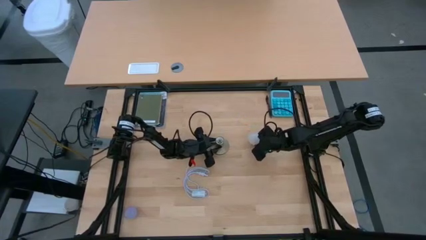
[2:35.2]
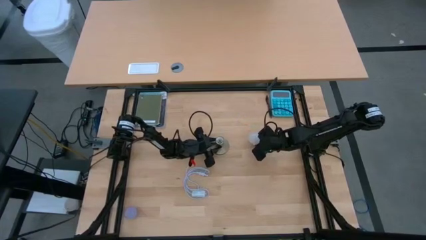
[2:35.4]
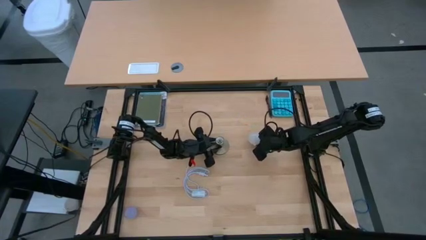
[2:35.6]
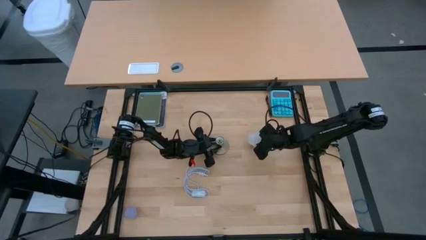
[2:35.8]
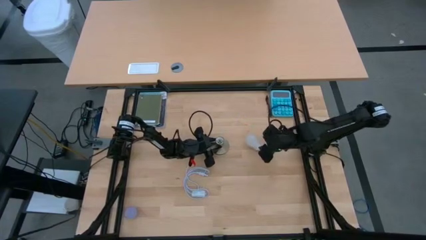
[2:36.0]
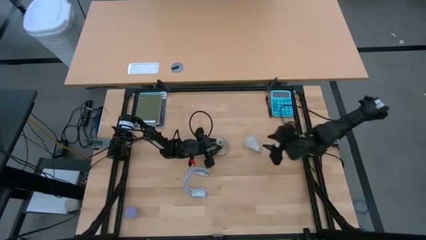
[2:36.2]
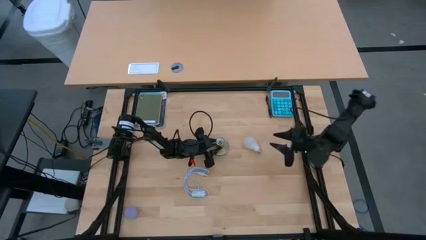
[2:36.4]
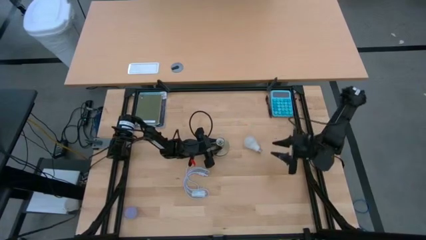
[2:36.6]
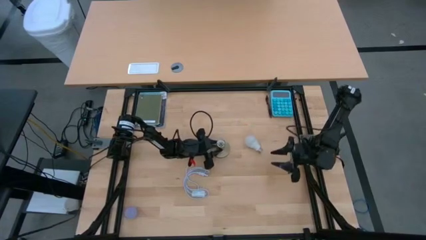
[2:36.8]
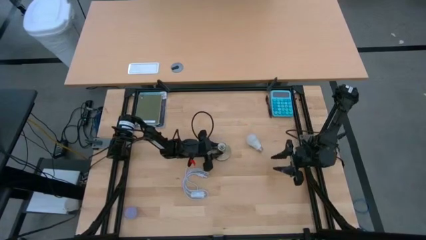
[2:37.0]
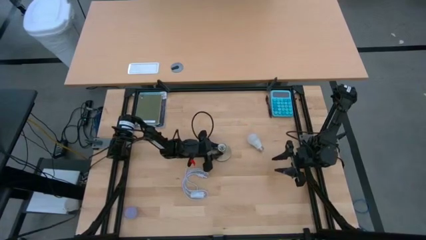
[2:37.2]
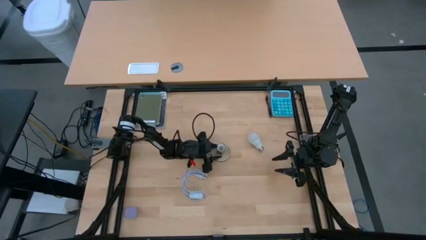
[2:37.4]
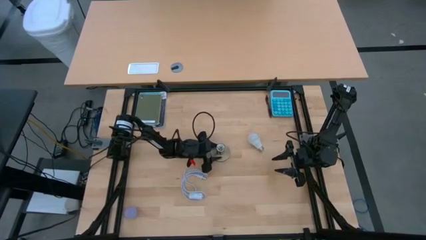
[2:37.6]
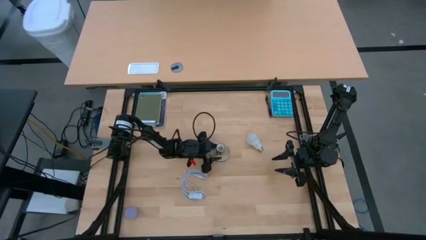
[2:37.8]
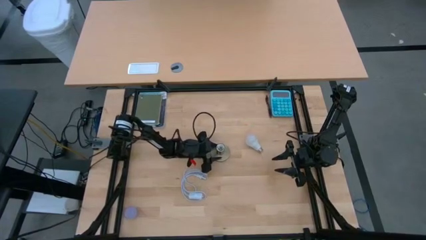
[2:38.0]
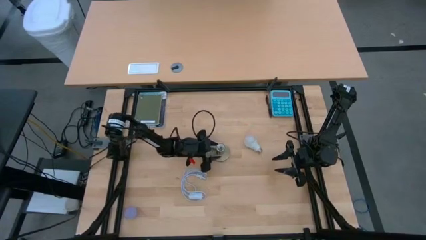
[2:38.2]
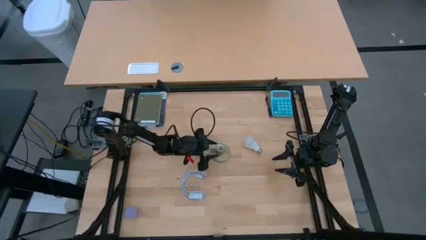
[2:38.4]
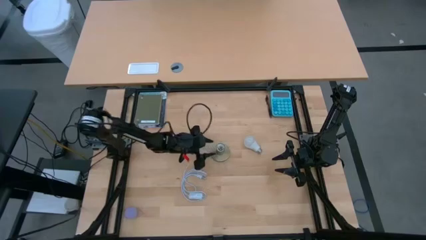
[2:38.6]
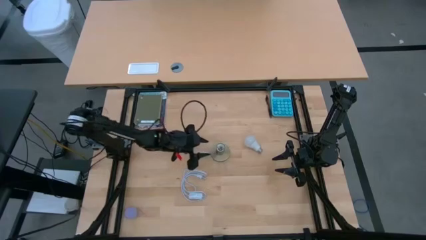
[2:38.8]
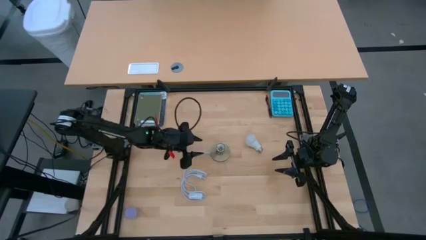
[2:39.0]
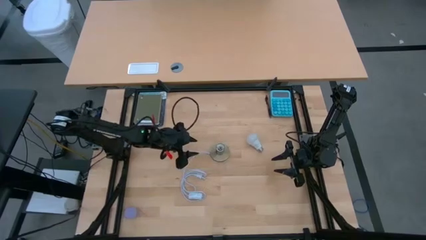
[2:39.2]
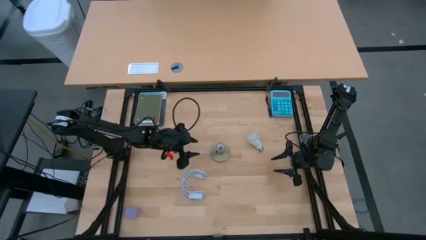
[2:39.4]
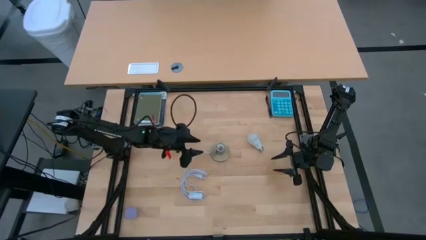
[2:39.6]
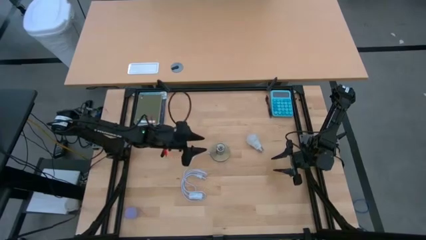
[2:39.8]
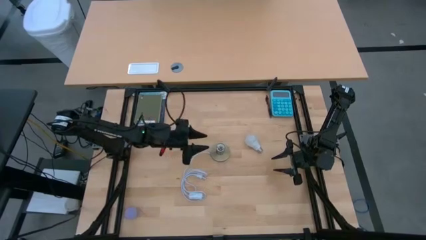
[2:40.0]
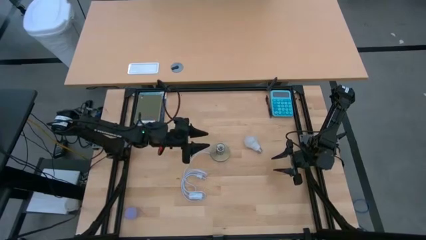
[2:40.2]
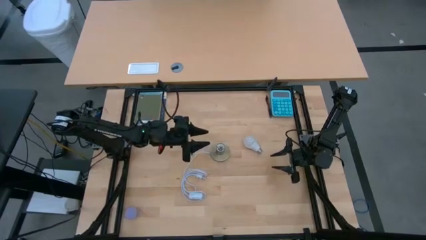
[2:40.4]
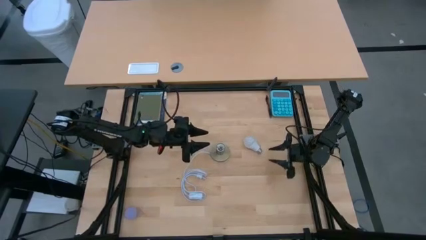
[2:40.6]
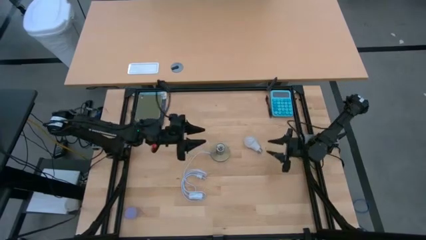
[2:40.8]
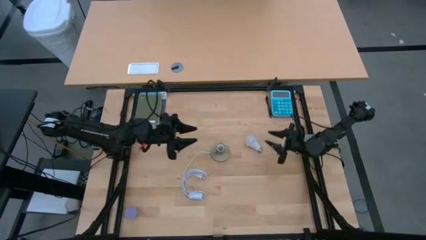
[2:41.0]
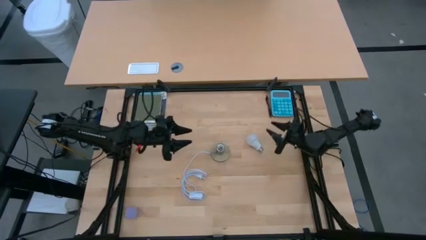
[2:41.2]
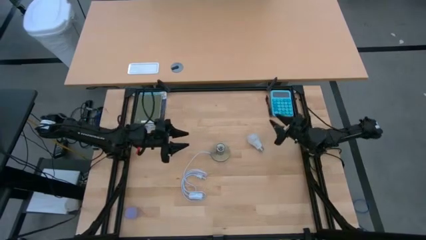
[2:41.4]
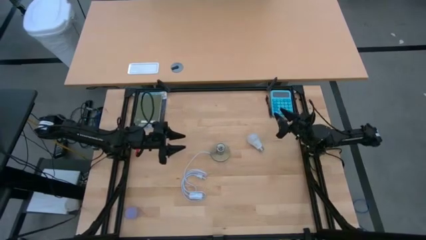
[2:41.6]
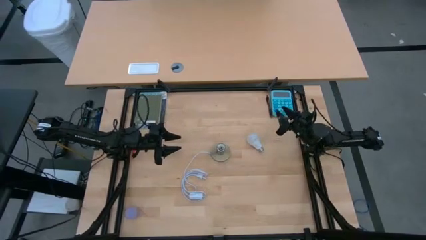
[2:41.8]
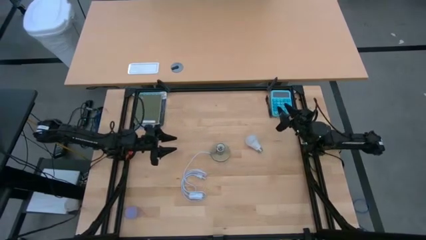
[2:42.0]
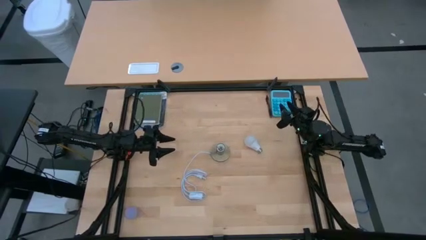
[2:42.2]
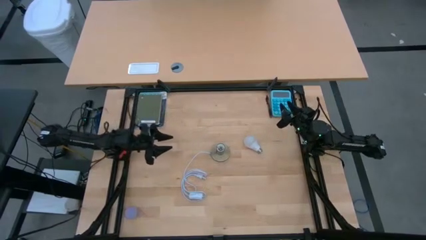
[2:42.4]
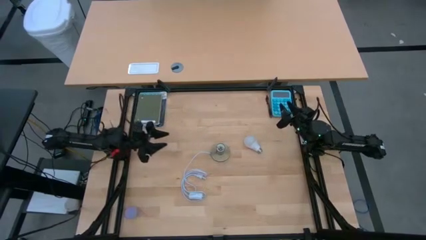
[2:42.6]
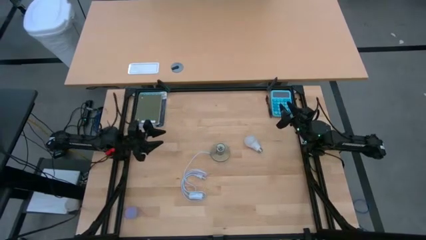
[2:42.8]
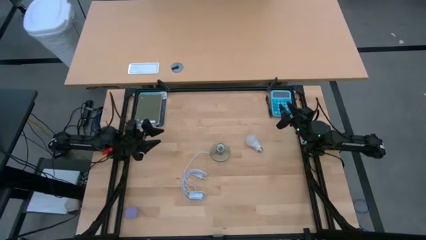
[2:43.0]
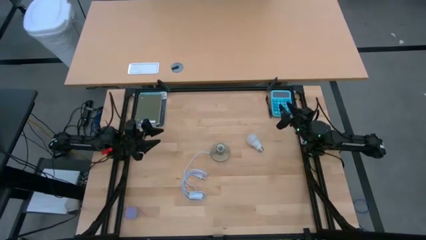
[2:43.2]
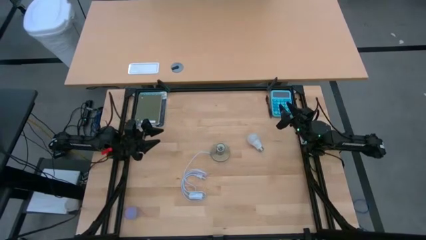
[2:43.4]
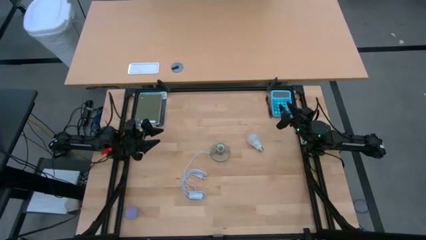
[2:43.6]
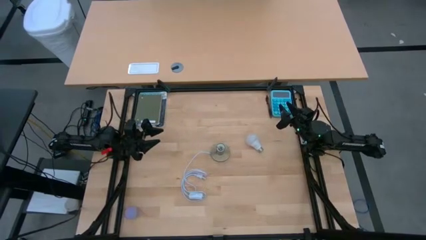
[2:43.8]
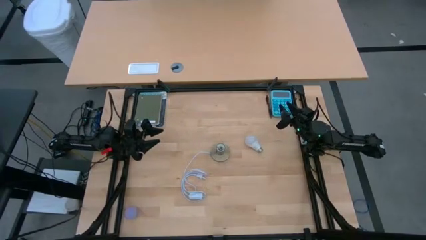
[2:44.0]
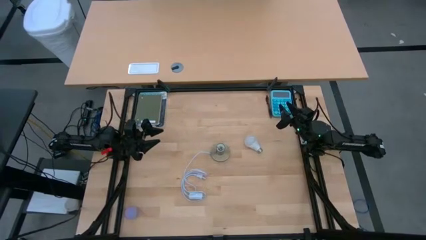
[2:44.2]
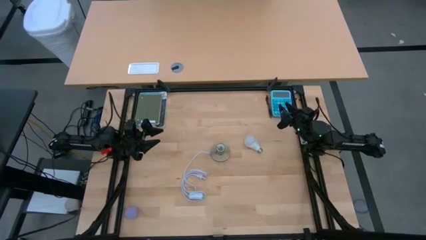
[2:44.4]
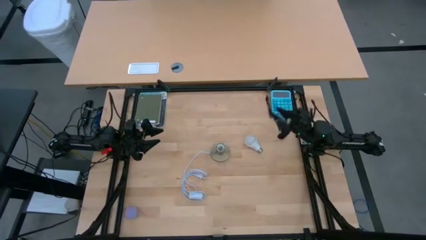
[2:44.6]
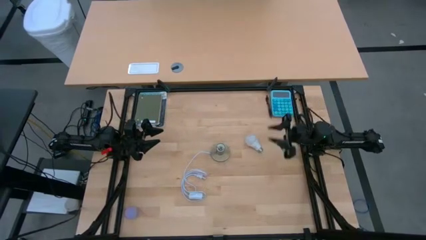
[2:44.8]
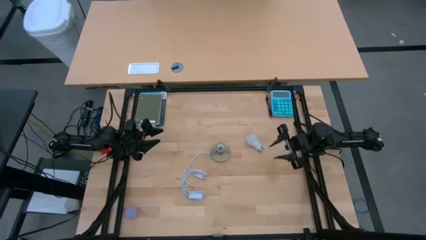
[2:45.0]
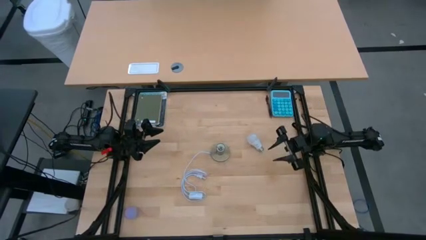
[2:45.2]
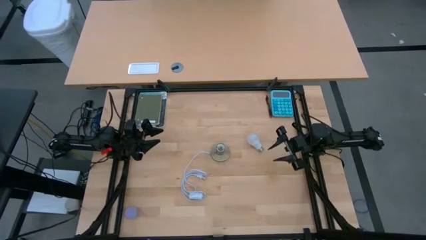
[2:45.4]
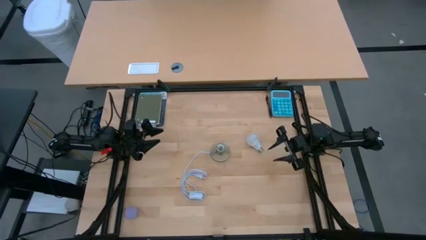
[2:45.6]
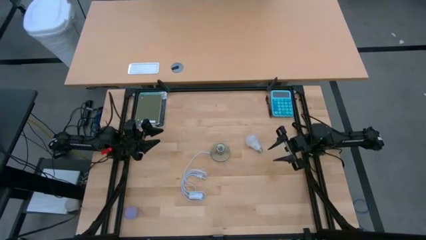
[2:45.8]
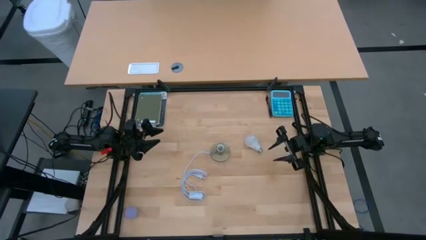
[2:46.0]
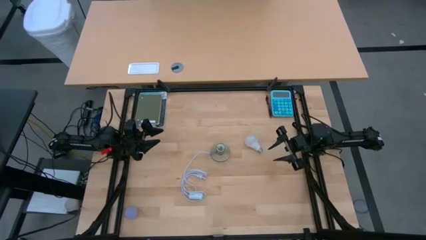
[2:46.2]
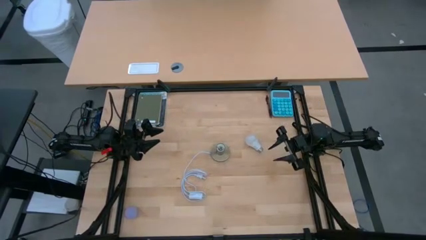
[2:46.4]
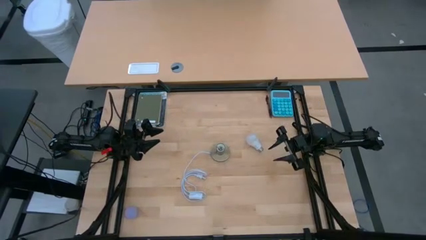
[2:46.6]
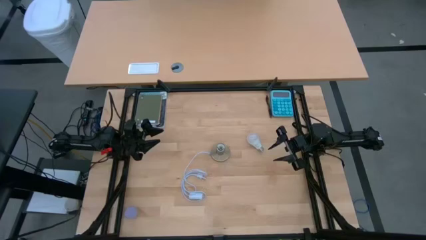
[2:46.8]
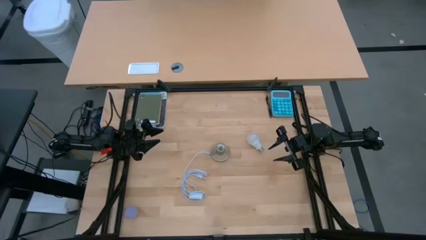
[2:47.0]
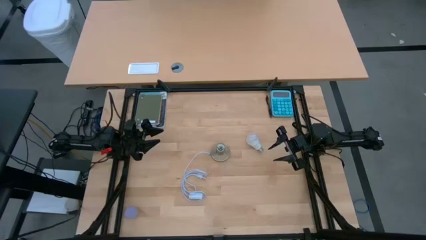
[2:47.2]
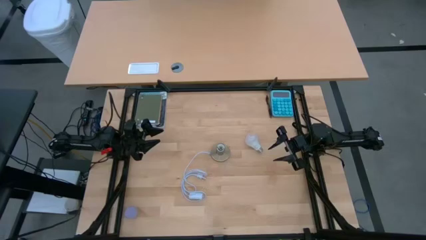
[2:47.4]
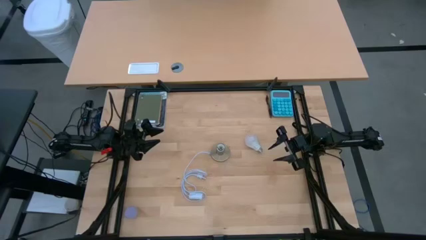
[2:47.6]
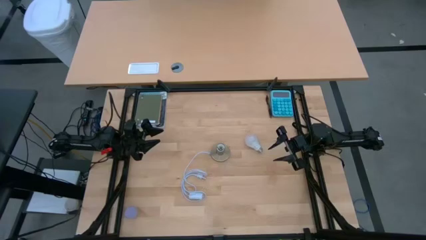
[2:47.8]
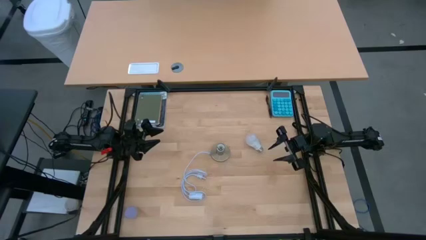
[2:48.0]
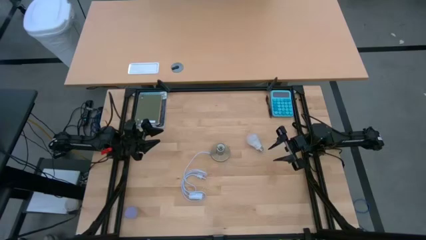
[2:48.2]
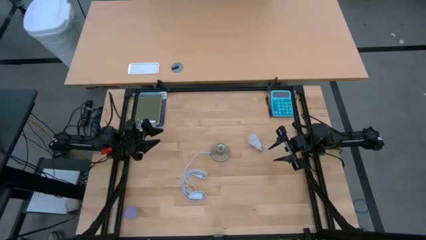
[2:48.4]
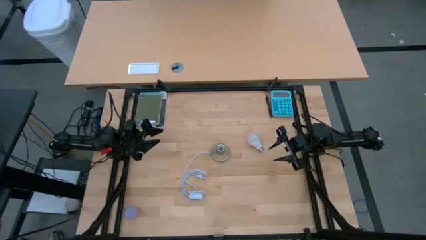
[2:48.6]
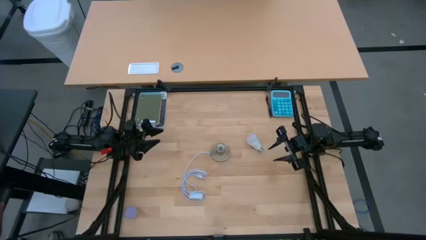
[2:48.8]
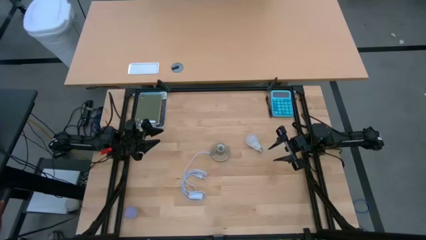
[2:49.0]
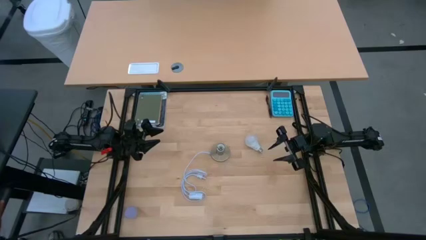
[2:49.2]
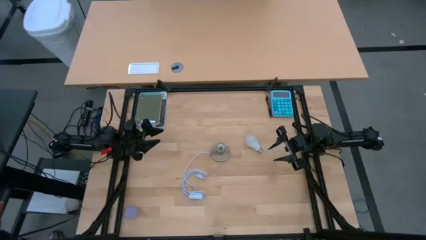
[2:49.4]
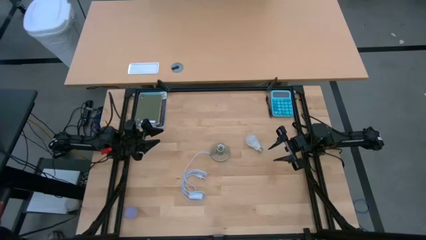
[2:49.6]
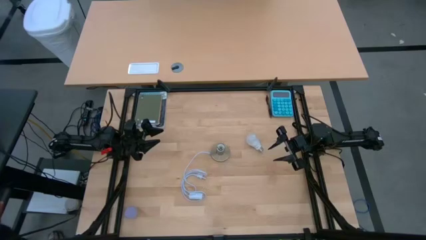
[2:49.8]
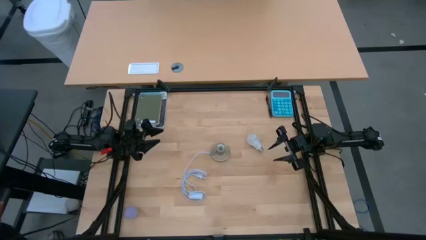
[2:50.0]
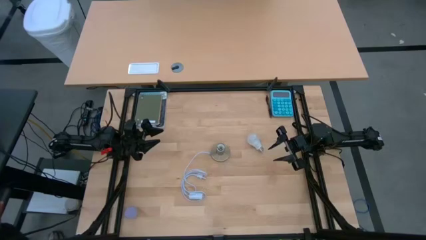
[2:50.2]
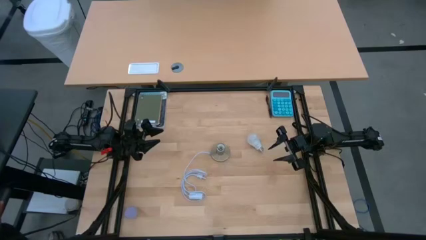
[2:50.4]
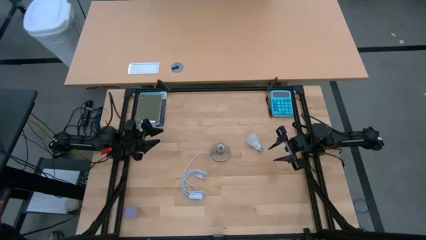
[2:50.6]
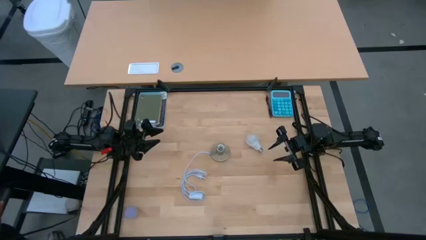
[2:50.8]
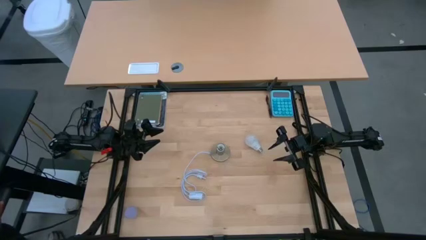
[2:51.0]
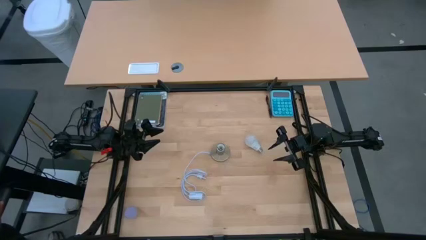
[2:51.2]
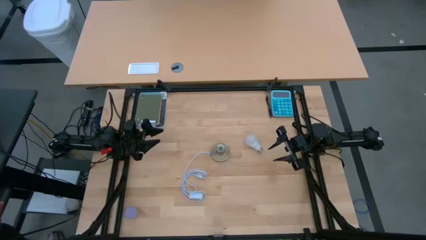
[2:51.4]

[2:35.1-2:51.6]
Task: Screw lightbulb
Return to Home Position
